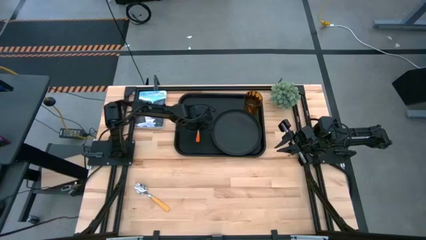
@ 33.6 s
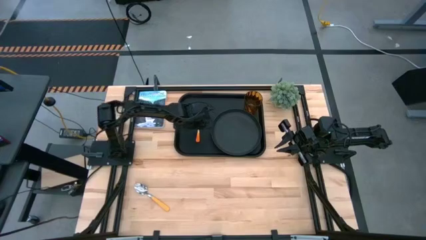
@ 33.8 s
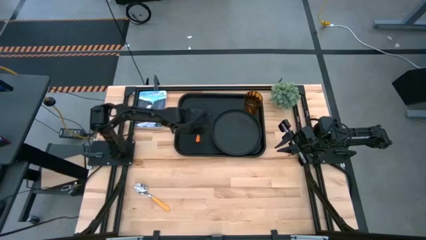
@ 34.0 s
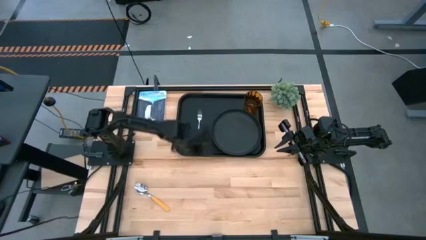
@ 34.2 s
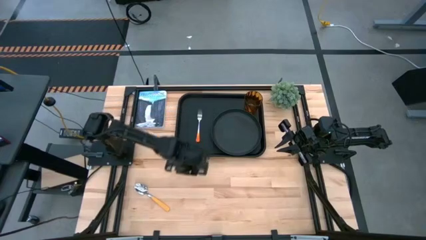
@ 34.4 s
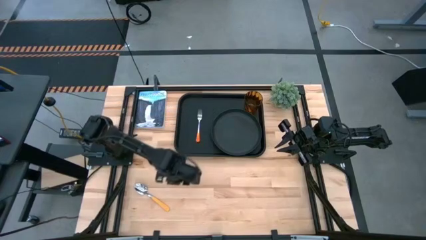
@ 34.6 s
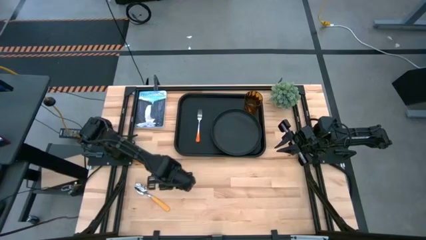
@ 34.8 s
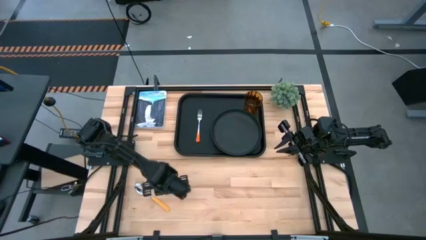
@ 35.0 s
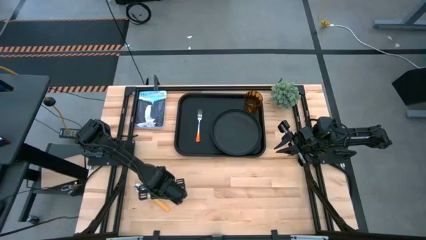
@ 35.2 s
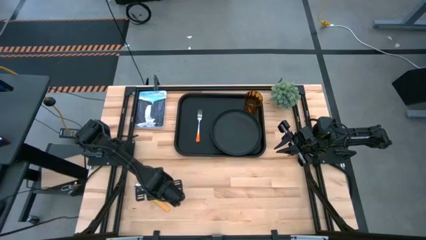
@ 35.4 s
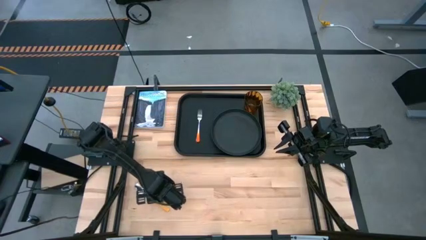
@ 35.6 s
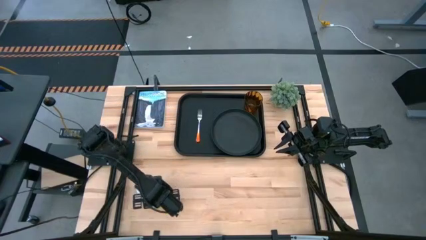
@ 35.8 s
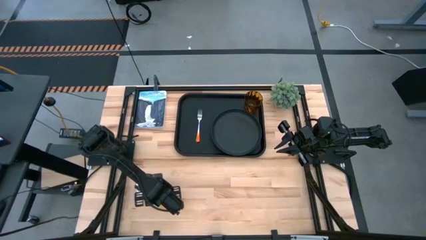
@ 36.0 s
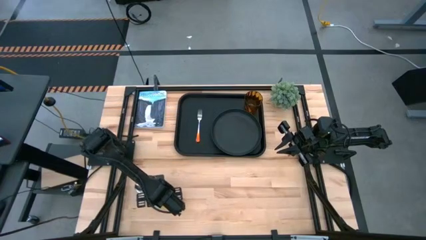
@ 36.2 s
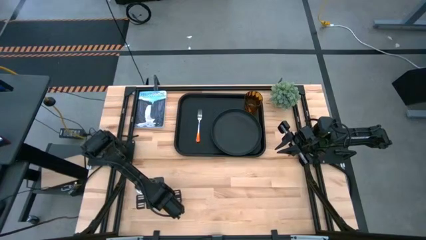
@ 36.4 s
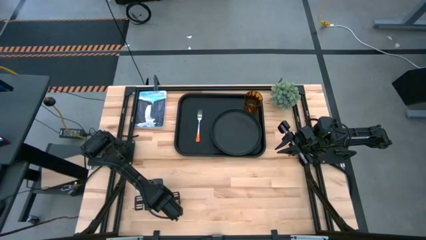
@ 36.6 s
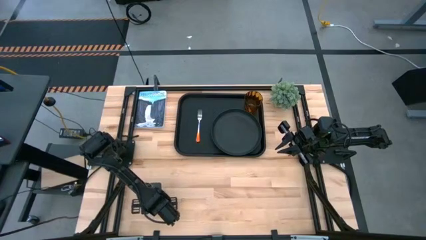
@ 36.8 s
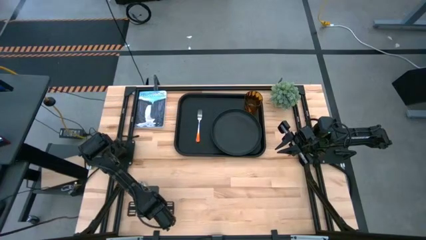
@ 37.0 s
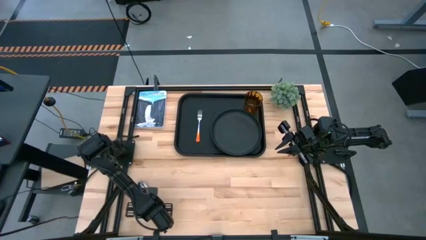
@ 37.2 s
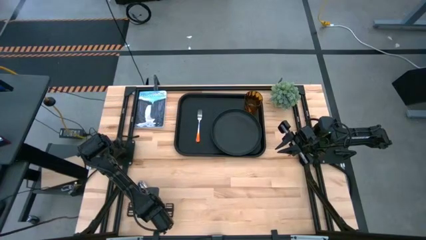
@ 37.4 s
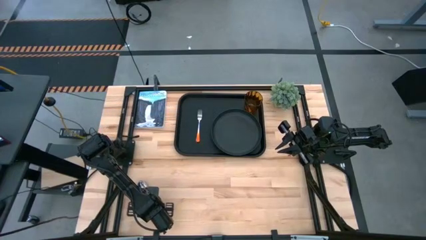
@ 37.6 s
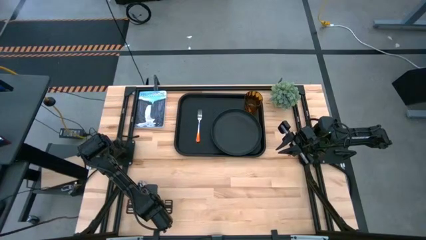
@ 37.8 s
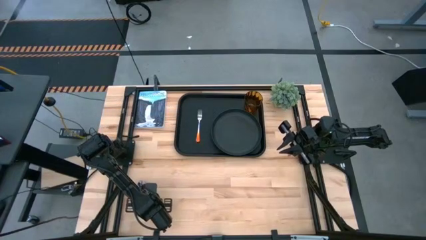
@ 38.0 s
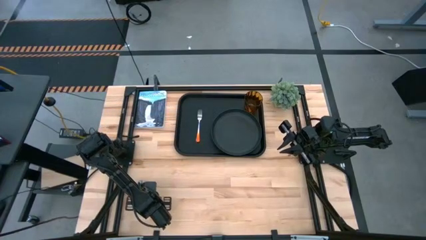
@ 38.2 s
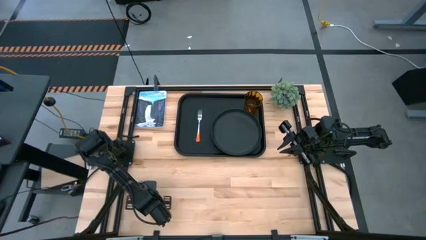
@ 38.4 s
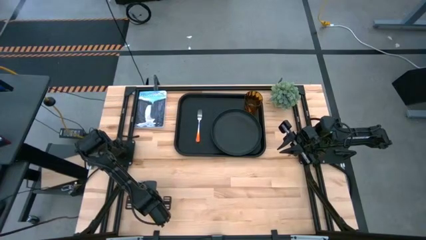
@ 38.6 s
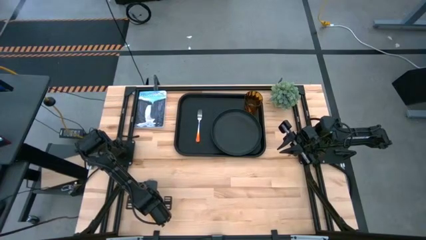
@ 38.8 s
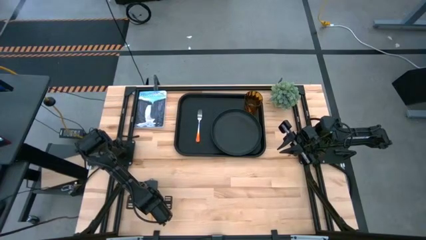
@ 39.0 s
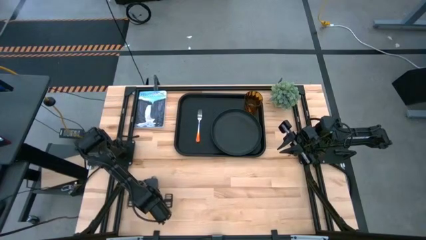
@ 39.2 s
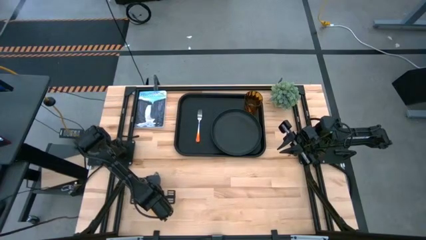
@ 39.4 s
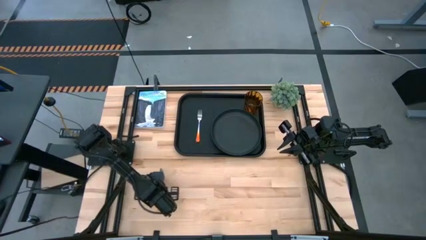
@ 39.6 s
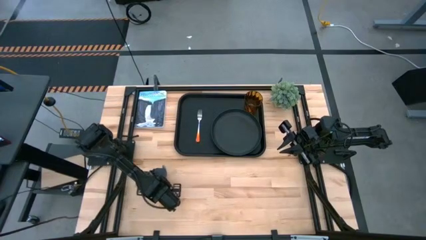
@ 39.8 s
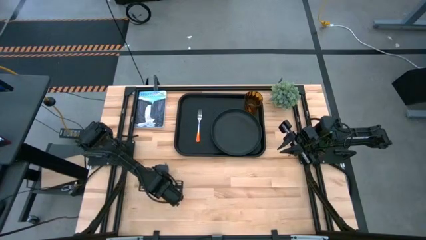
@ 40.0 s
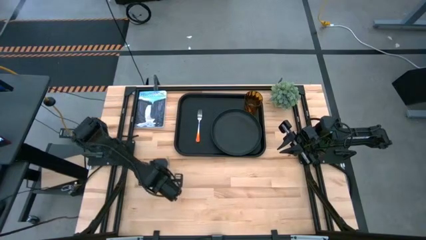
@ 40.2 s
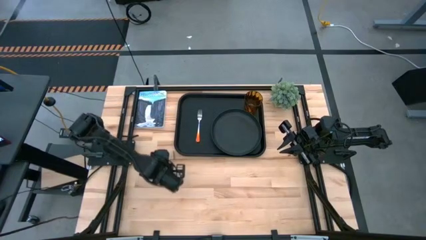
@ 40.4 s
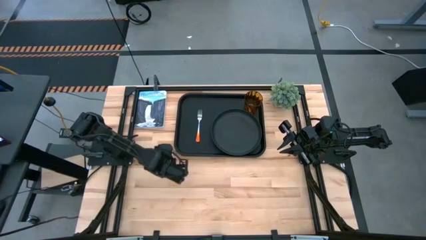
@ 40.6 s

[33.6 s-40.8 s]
Task: Pick and place plate/cup/fork/spoon on tray
Put the yellow spoon to the left of the orange fork on the black tray

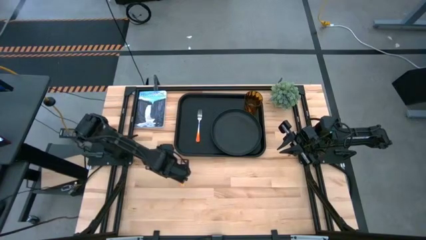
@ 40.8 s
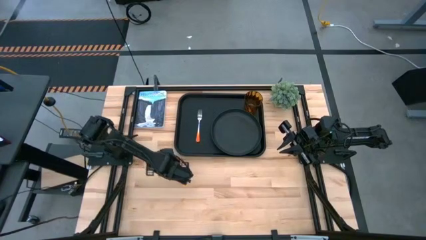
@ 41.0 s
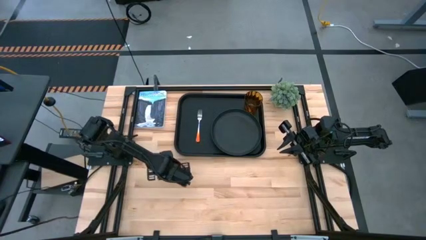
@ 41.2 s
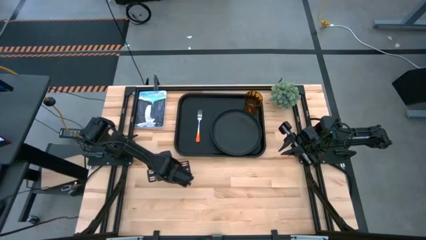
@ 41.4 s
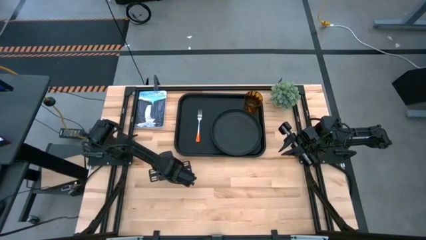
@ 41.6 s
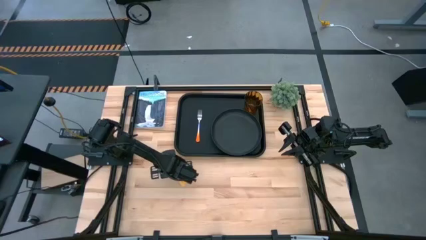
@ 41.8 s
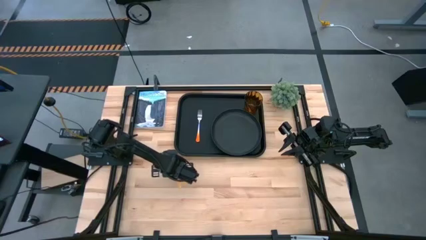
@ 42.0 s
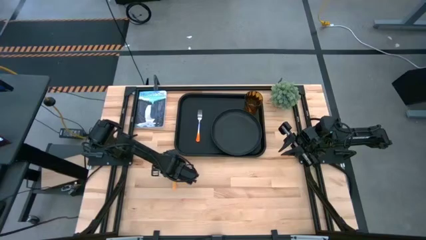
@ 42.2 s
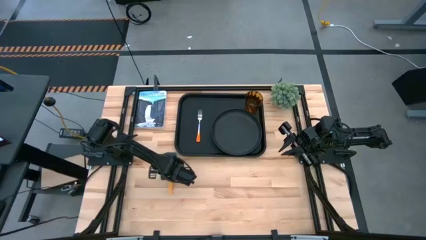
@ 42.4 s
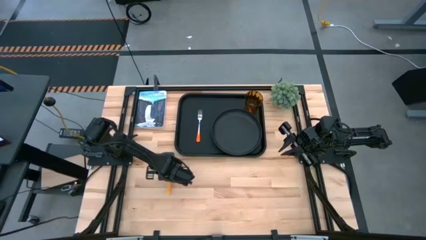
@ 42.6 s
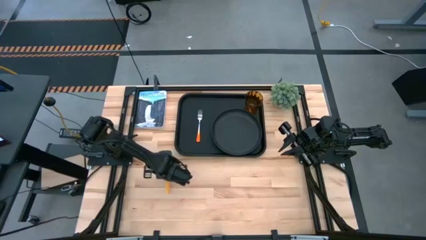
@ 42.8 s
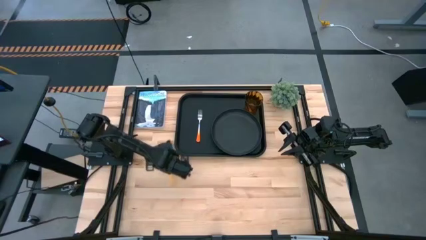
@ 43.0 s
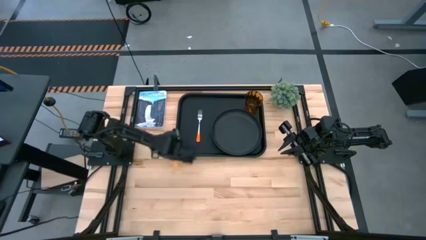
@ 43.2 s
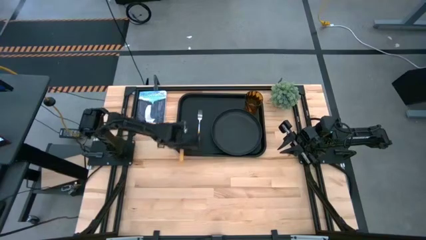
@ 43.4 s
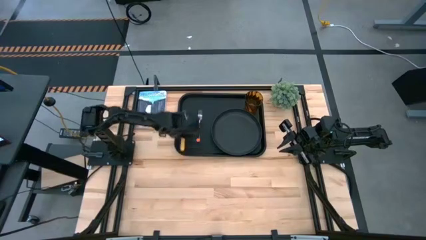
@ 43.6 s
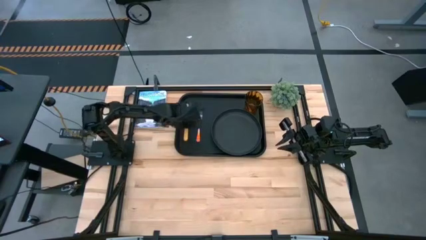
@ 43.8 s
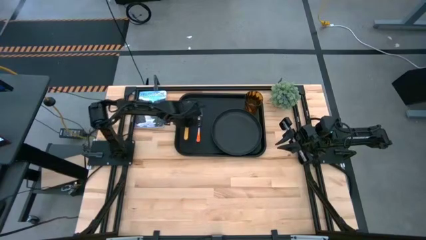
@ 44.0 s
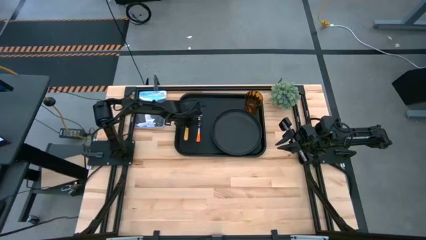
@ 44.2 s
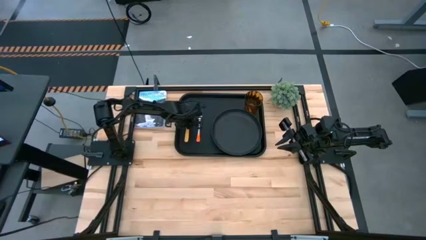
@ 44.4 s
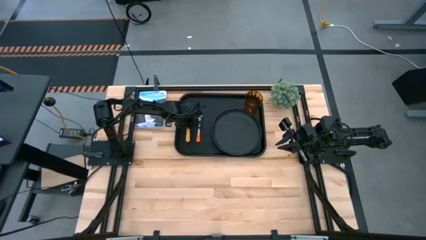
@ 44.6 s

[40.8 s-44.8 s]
Put the yellow spoon to the left of the orange fork on the black tray

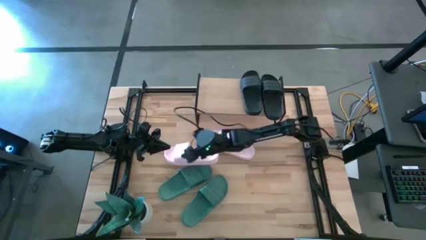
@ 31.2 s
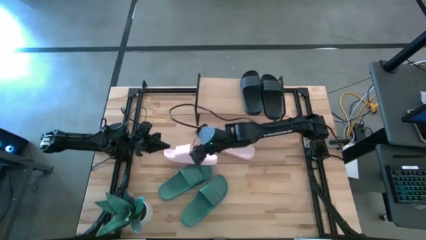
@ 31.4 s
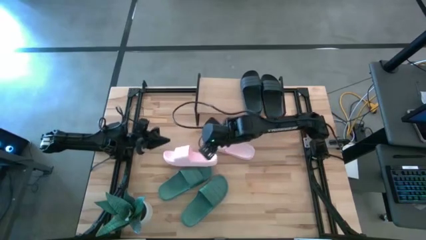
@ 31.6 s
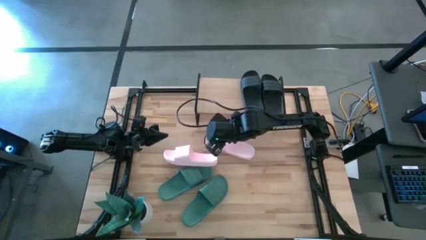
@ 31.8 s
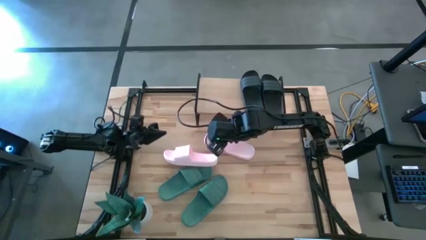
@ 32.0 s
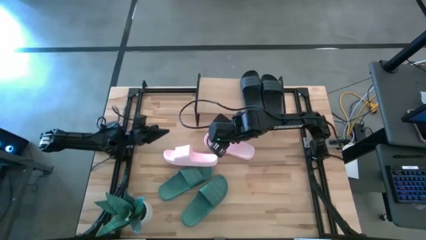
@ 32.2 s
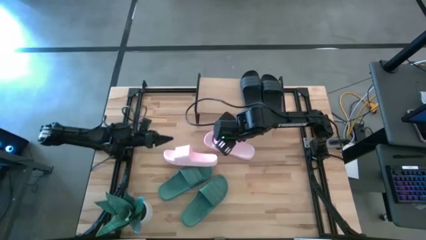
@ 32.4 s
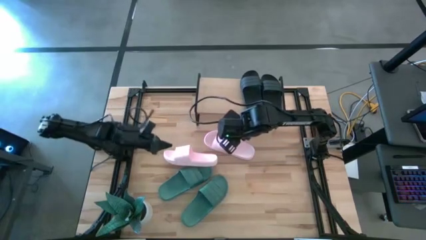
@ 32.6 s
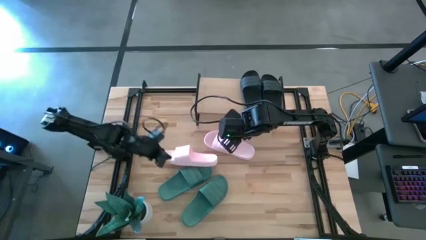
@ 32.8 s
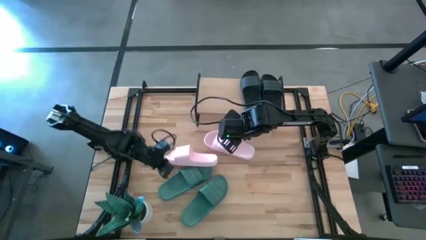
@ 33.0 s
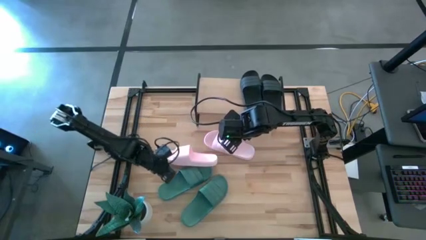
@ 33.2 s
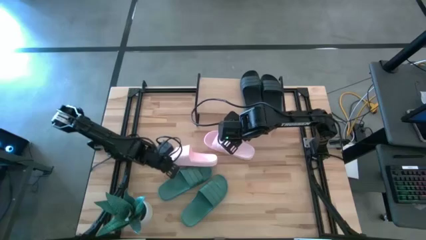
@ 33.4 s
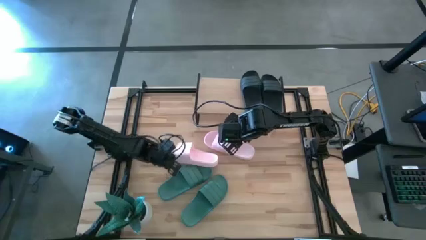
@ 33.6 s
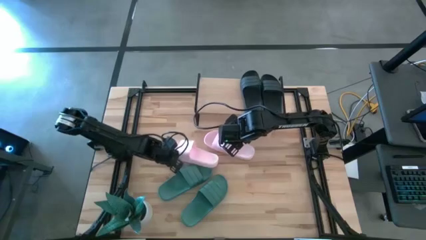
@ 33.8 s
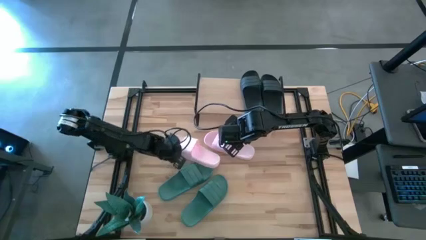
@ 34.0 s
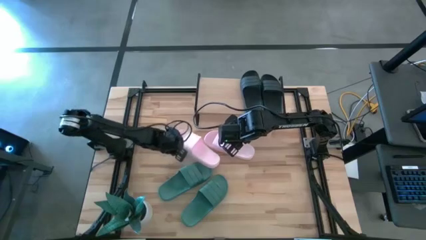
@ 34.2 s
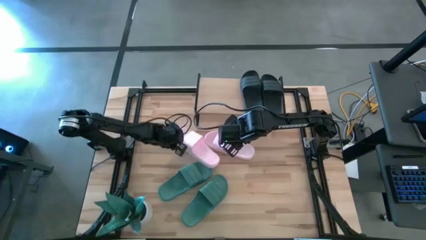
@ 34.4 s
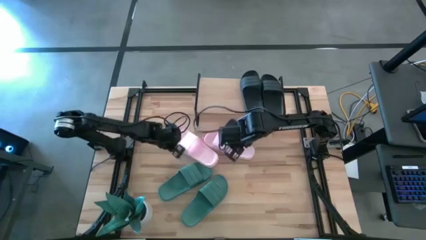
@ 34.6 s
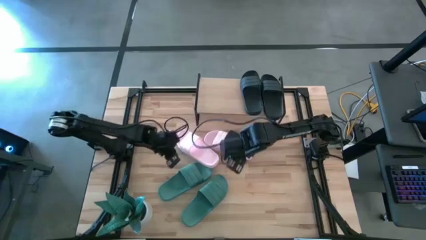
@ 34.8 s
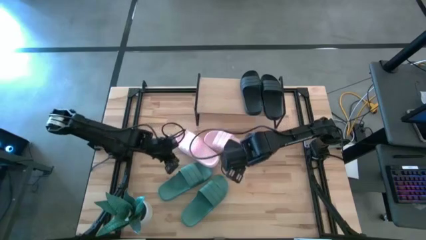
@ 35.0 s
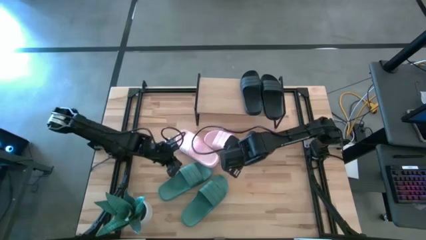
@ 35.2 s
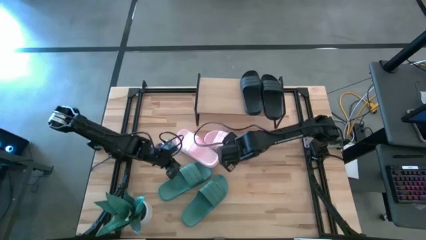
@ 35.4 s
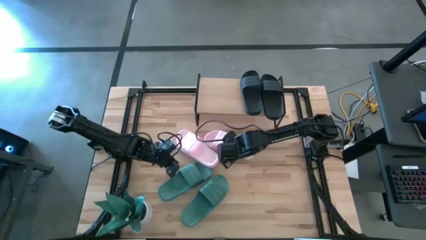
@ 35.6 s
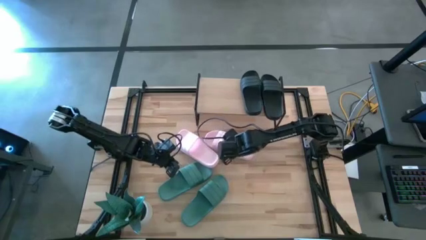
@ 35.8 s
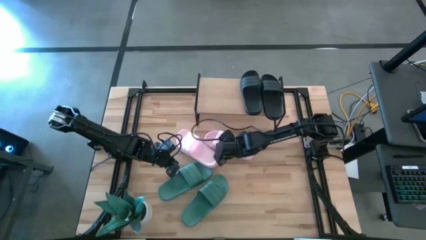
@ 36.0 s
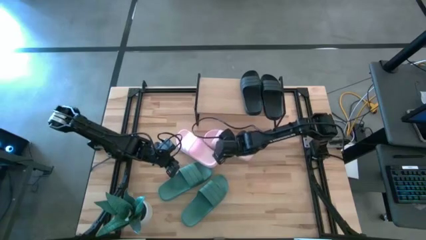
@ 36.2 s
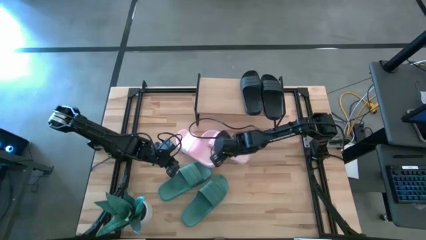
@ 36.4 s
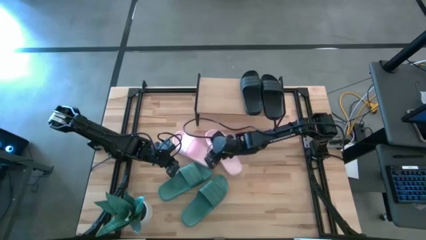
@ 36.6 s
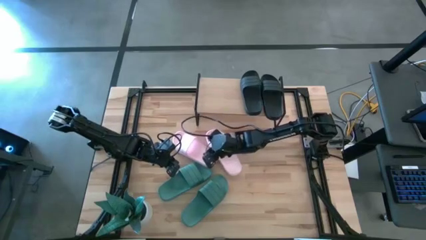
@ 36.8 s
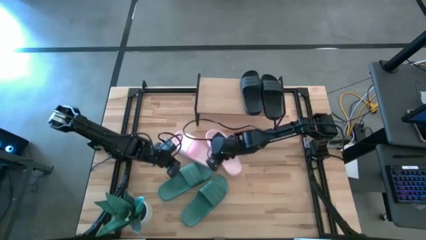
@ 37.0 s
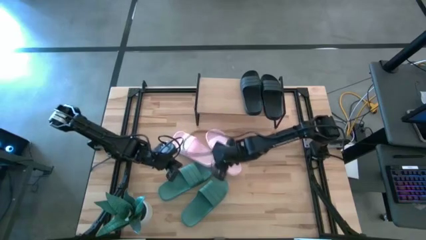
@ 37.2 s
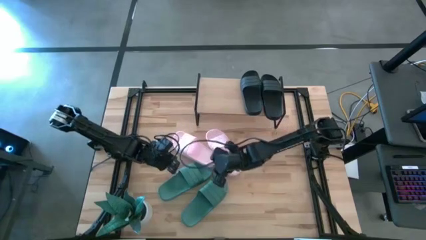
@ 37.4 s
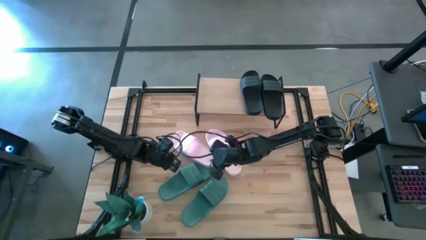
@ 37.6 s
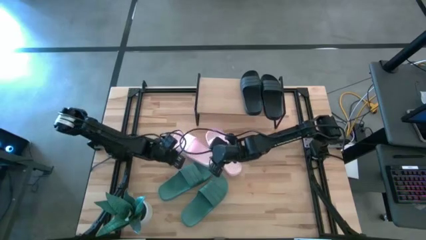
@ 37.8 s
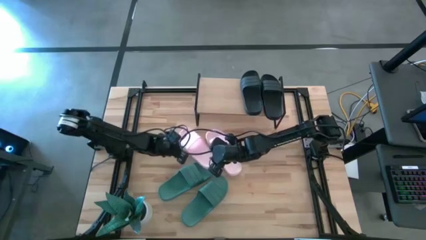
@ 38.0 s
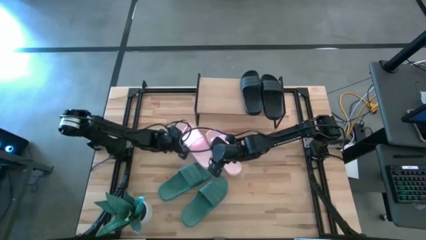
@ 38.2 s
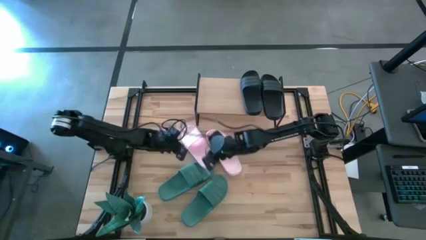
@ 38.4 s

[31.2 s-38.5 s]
Task: Pick and place slides into the shelf
Adjust the pink slippers
